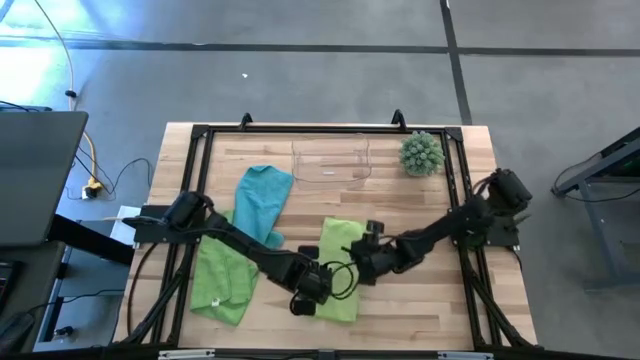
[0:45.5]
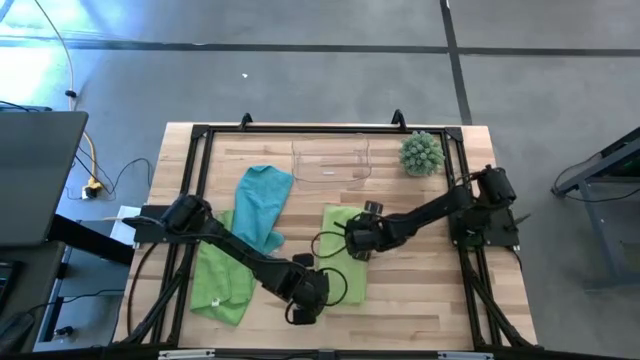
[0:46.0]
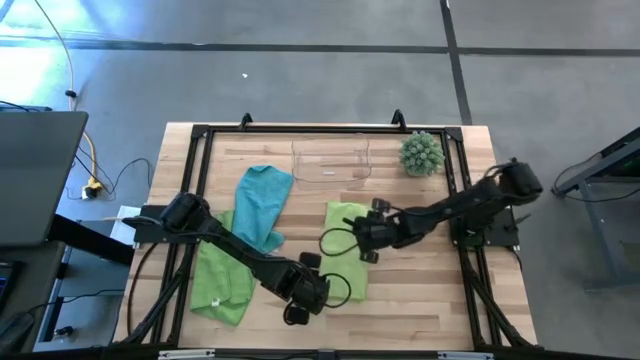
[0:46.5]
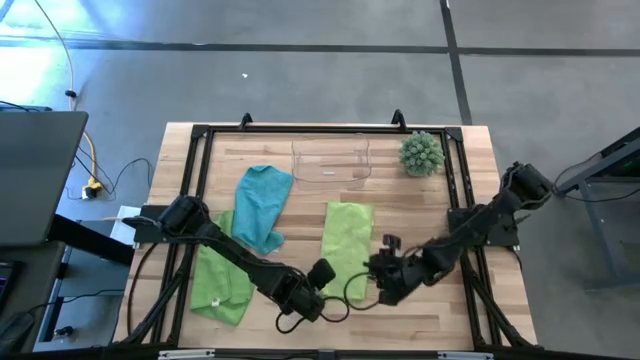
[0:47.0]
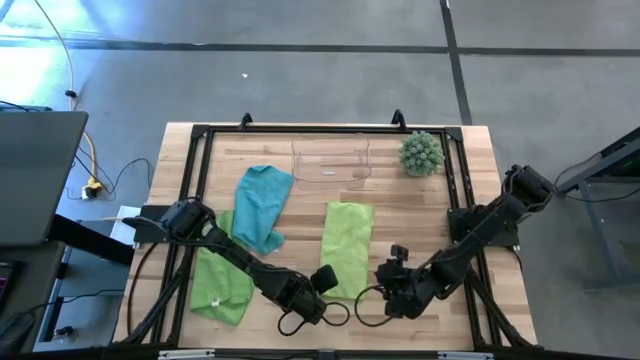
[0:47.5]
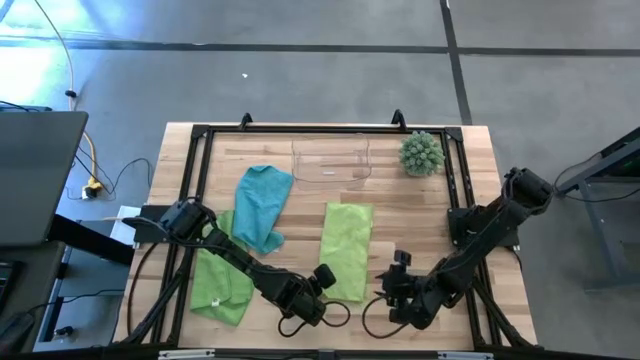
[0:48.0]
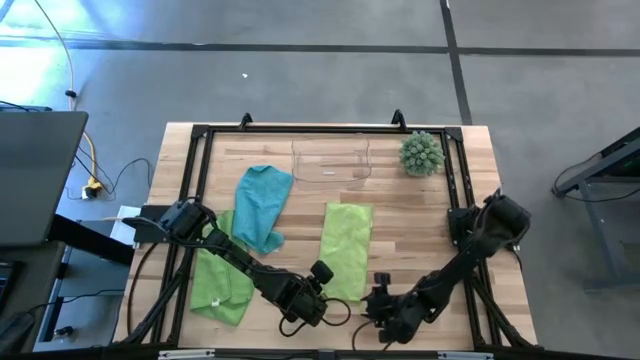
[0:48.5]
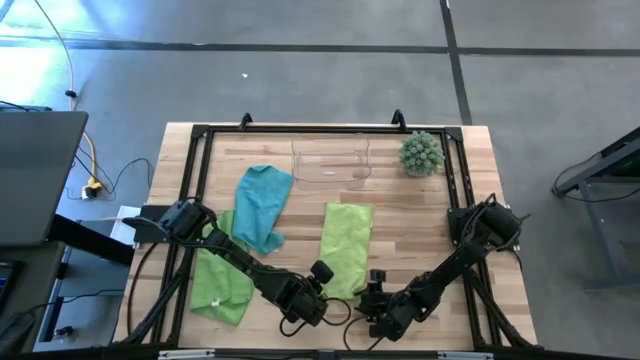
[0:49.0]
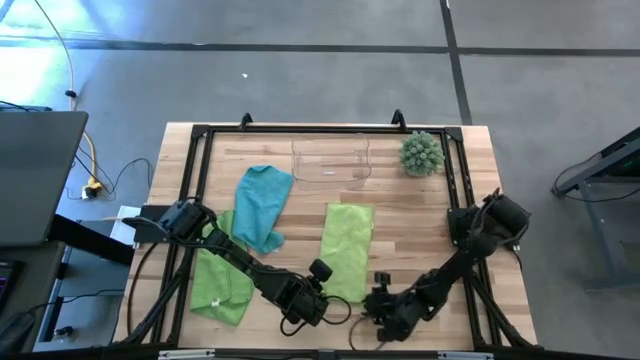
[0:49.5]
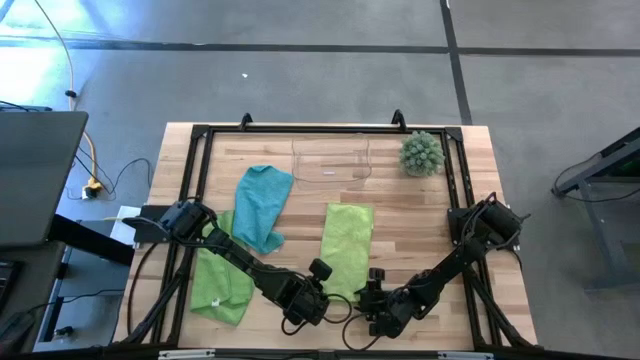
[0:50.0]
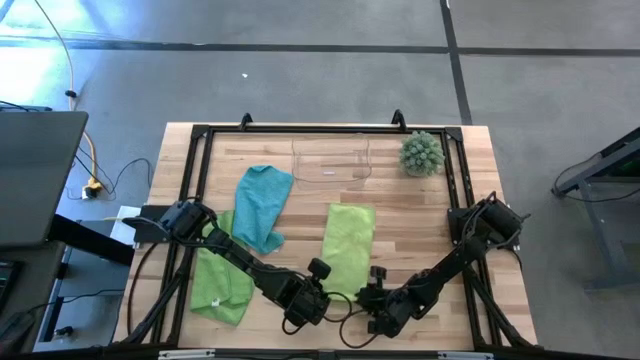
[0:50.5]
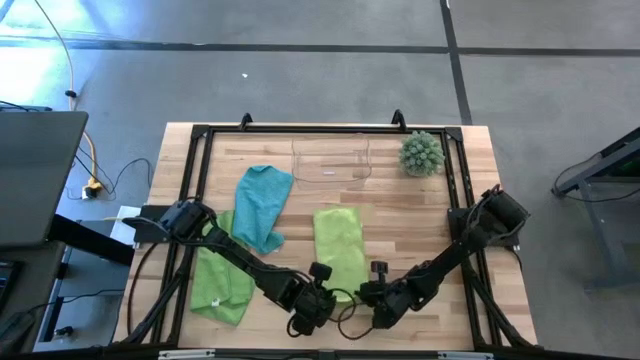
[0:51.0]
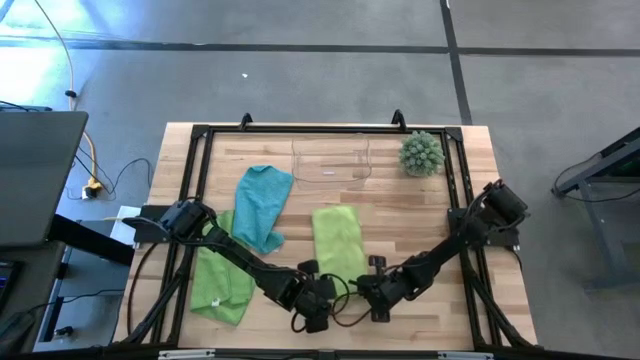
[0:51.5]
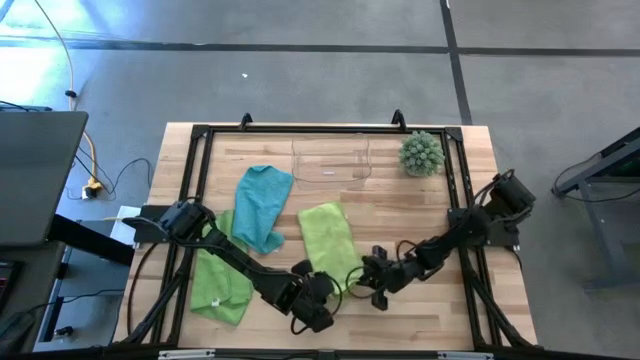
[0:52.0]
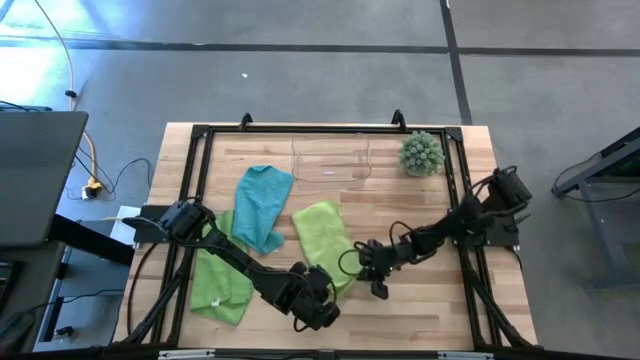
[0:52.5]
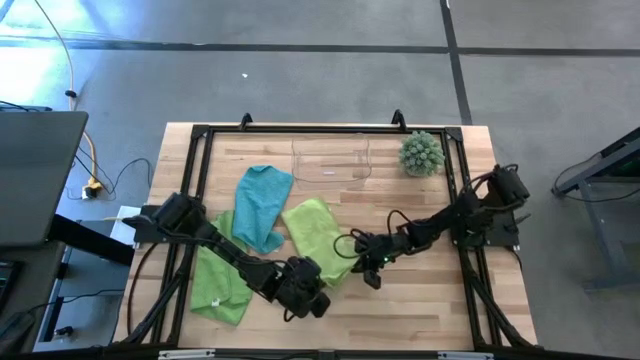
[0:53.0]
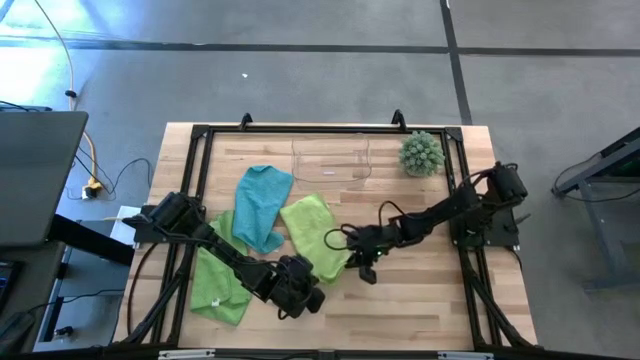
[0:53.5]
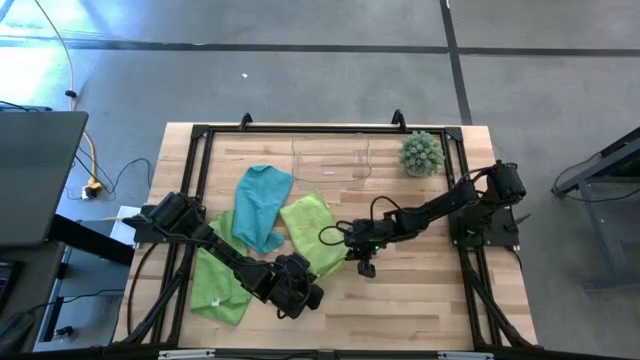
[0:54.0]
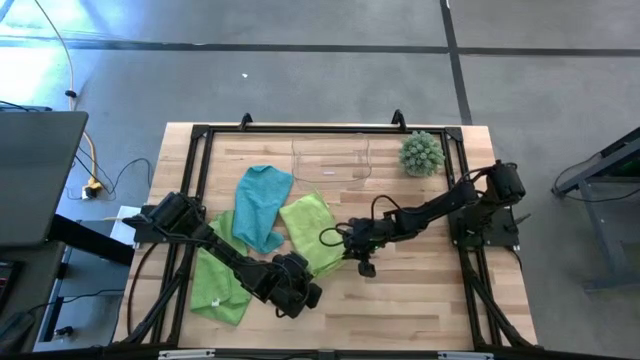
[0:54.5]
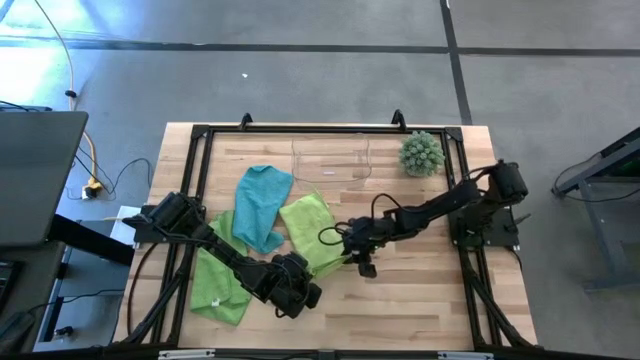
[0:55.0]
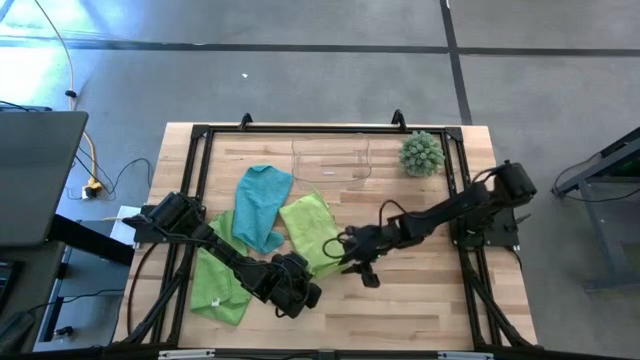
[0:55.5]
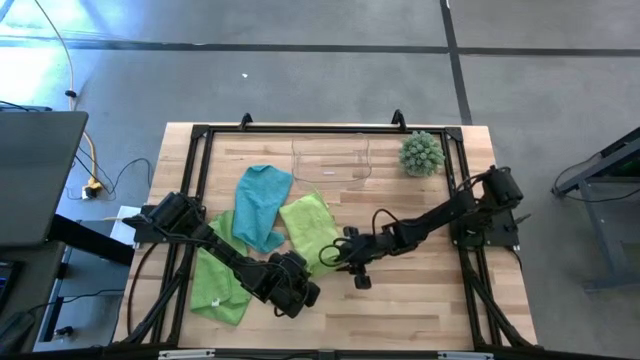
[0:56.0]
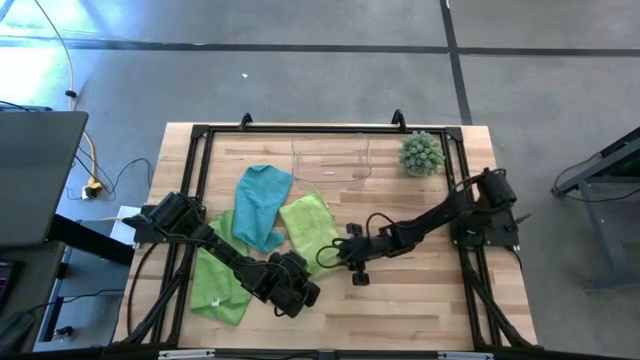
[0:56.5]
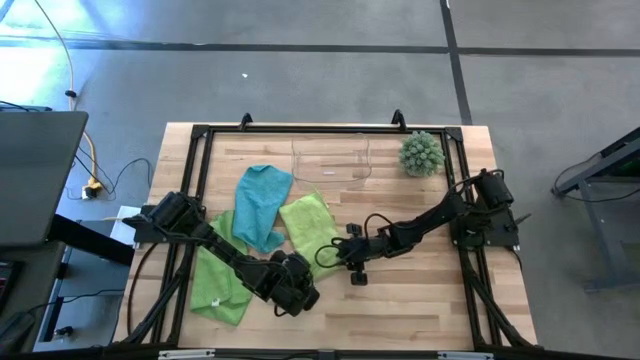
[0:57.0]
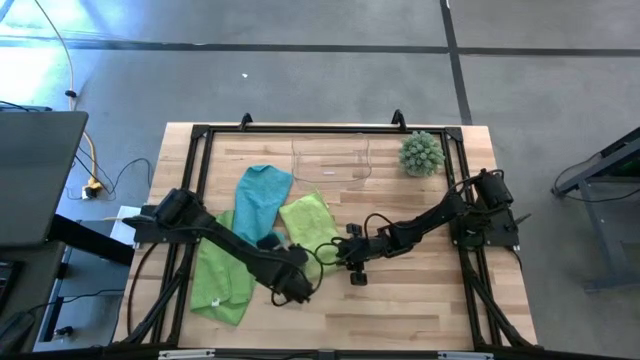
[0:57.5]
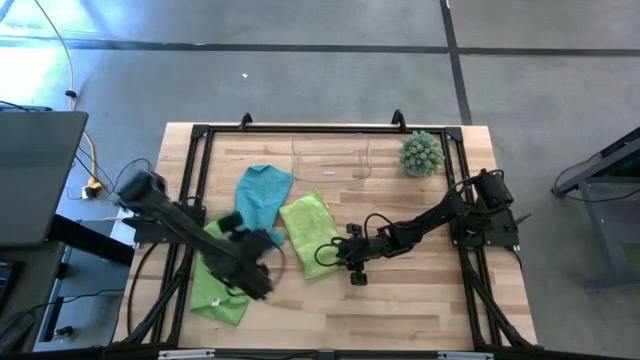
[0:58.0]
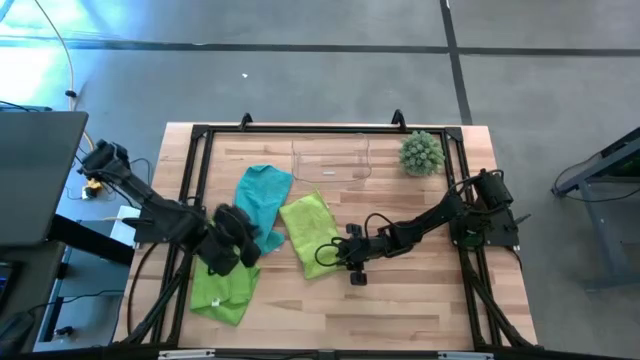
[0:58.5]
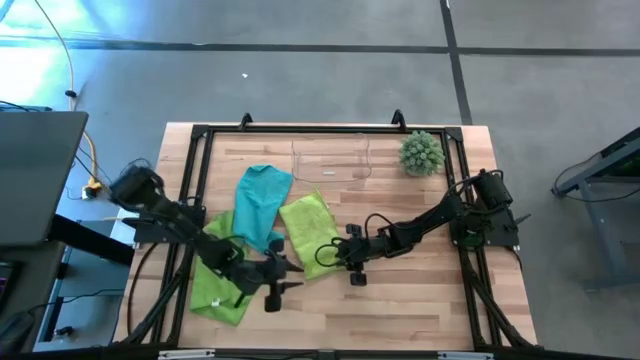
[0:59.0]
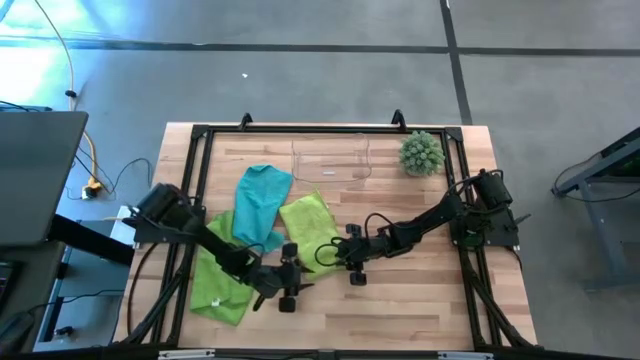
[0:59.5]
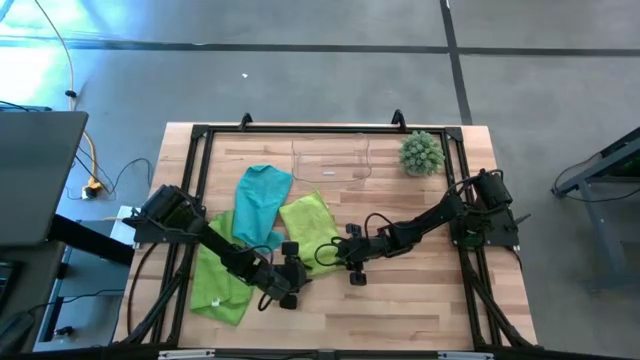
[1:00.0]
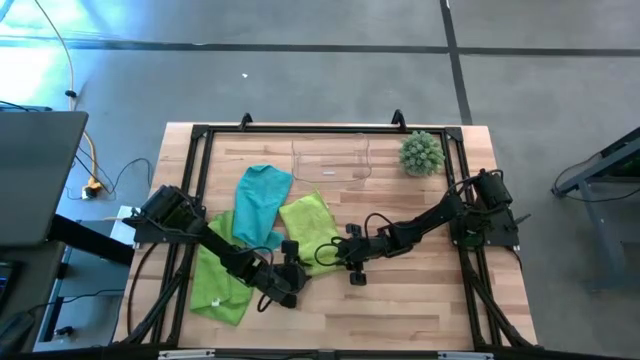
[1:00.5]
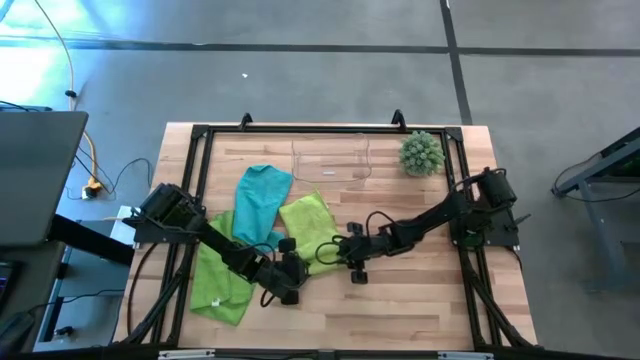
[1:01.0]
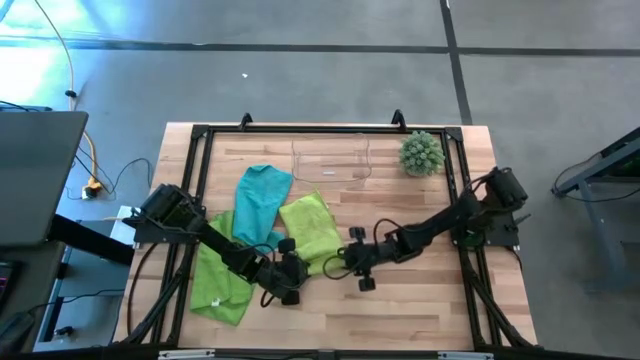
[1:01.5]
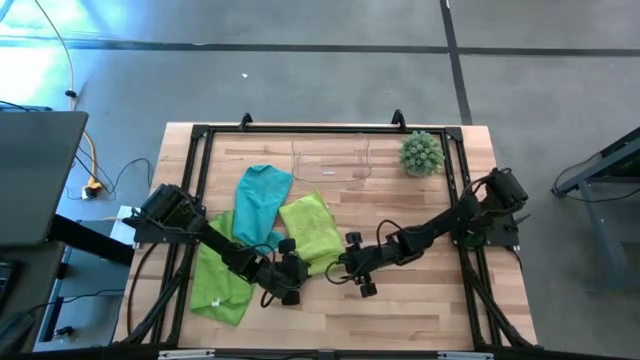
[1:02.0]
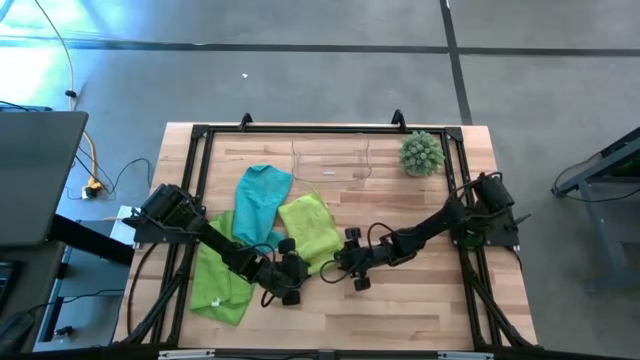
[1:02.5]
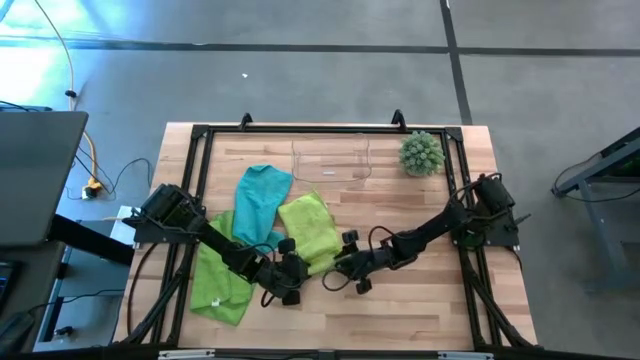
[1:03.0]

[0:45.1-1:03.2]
Task: Roll microfiber towels into tight, uniform cylinder then place into a basket
Roll the light green microfiber cloth

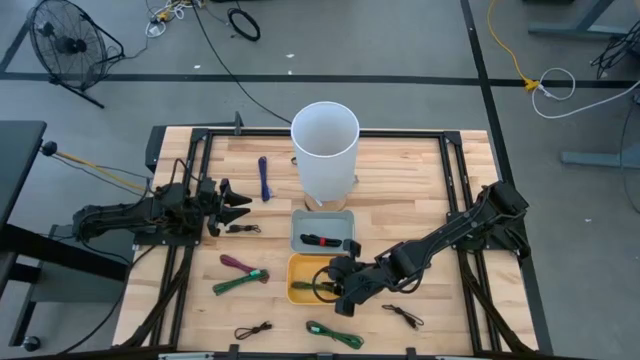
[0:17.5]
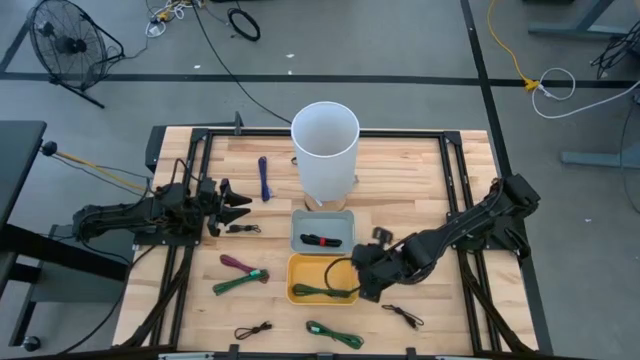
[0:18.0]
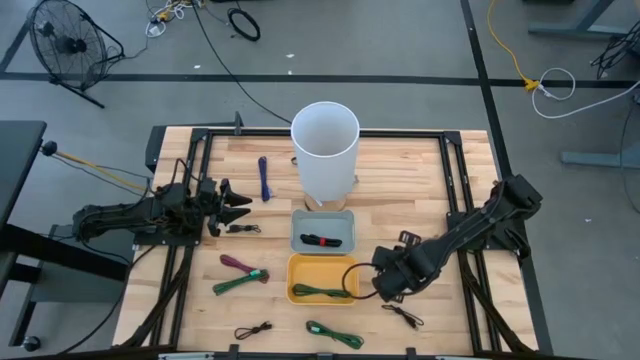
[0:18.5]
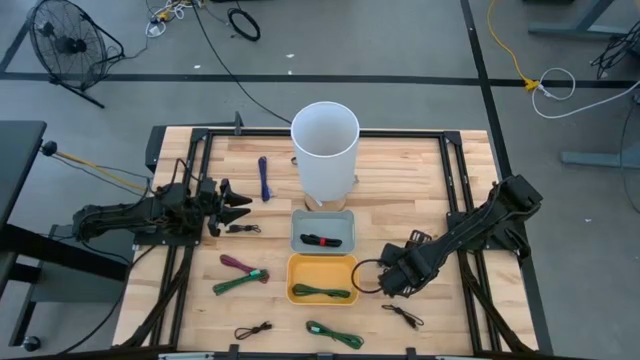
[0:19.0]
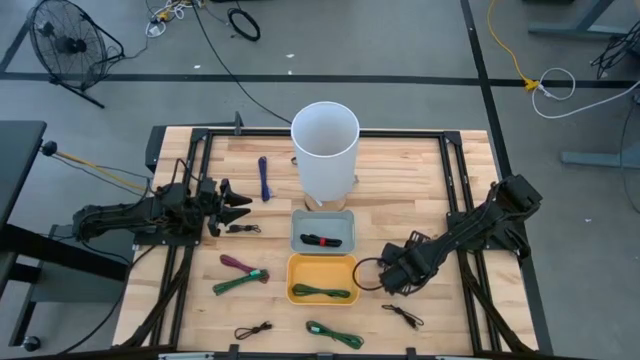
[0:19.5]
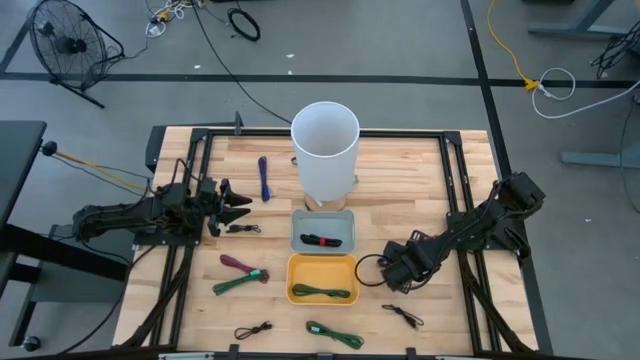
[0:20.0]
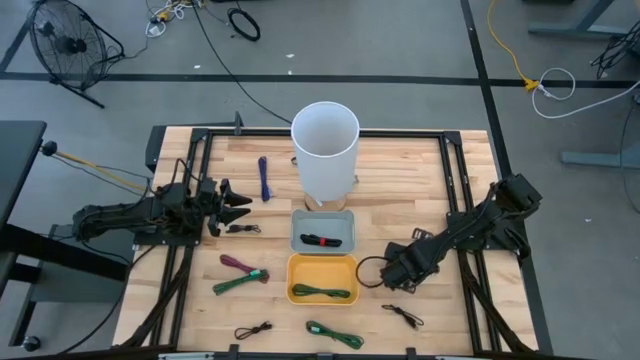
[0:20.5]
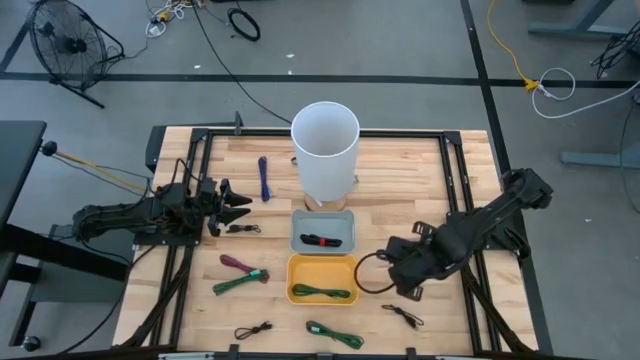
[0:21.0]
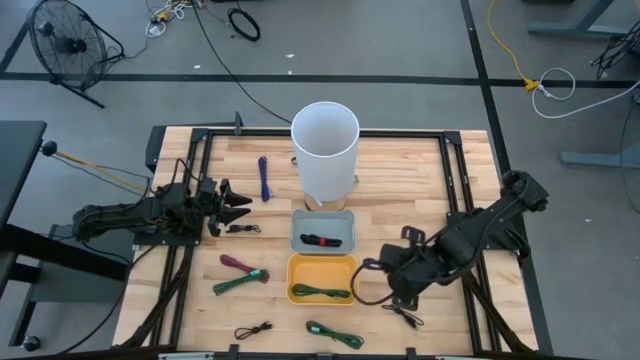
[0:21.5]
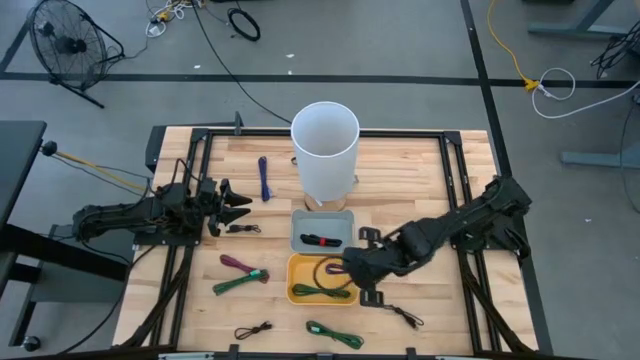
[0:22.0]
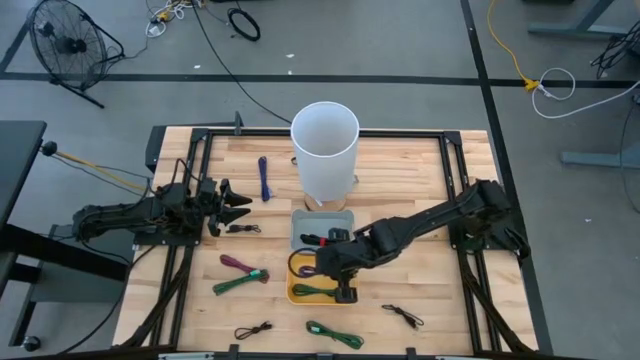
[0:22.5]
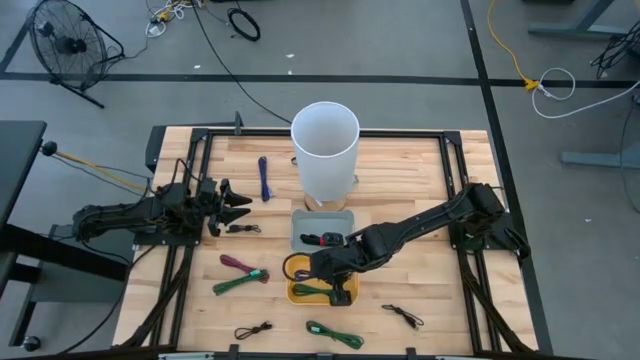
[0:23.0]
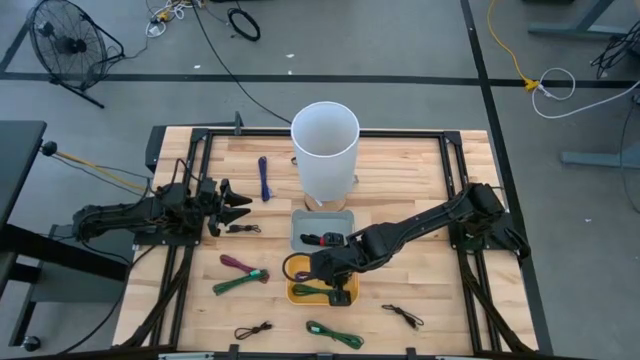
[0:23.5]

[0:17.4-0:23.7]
Task: Pick & Place USB Port
Put the purple charger cable into the yellow bin
